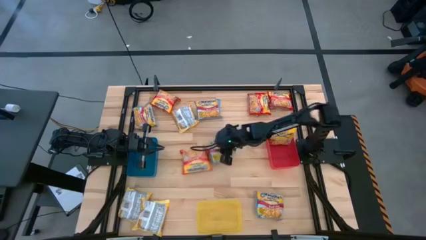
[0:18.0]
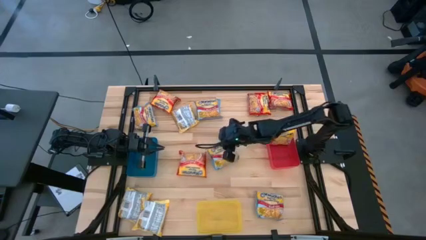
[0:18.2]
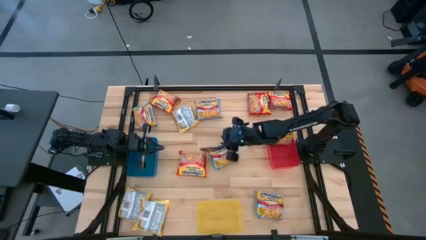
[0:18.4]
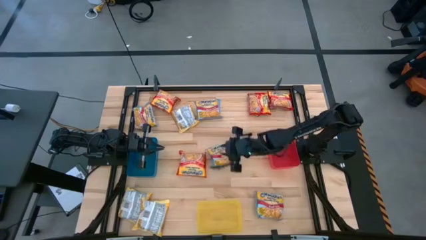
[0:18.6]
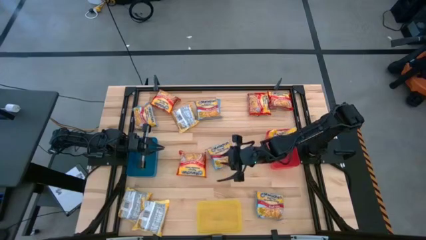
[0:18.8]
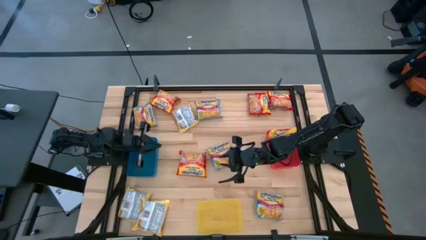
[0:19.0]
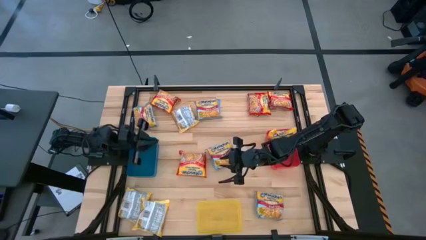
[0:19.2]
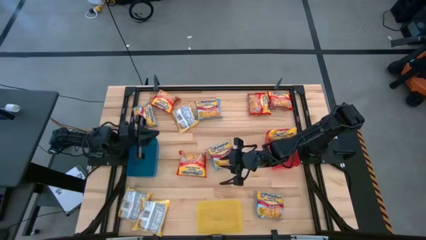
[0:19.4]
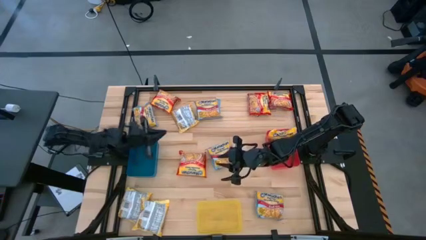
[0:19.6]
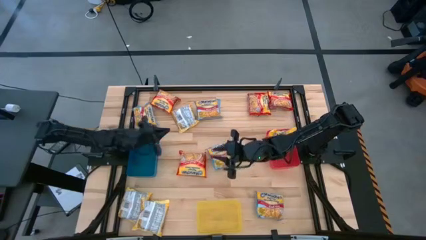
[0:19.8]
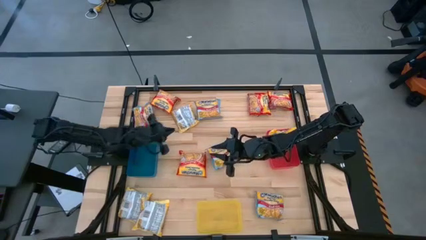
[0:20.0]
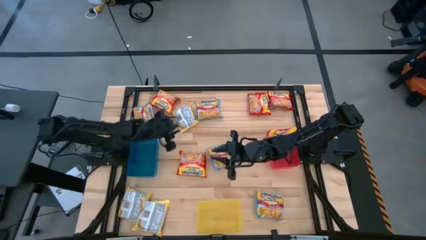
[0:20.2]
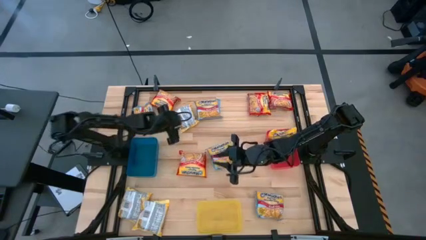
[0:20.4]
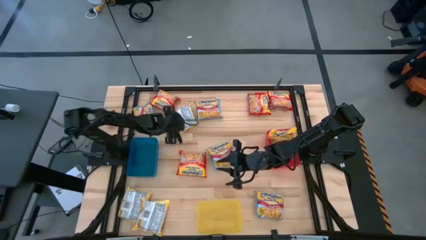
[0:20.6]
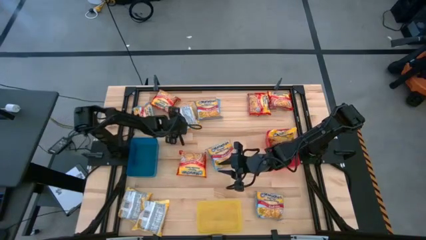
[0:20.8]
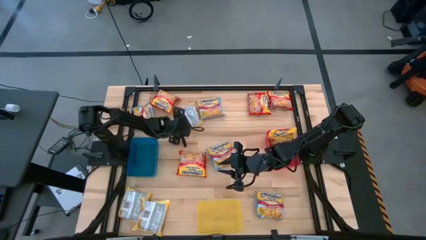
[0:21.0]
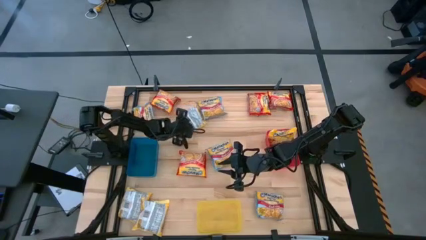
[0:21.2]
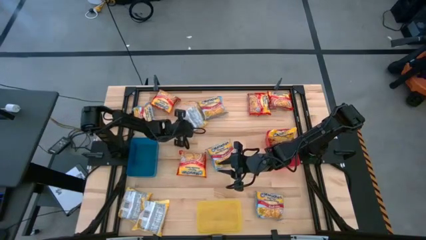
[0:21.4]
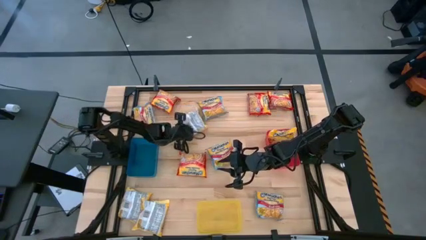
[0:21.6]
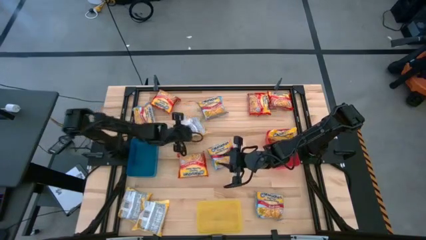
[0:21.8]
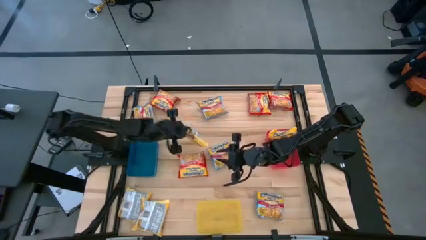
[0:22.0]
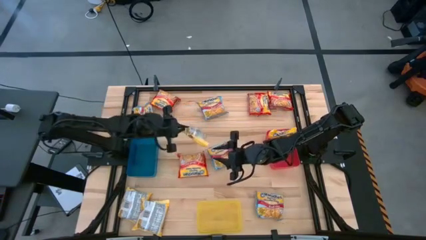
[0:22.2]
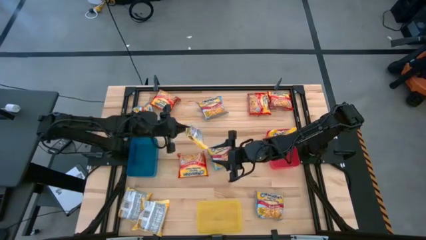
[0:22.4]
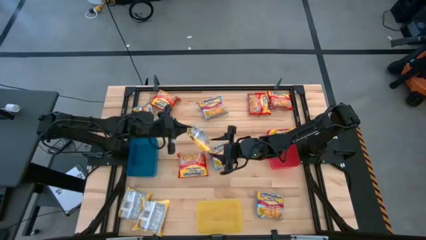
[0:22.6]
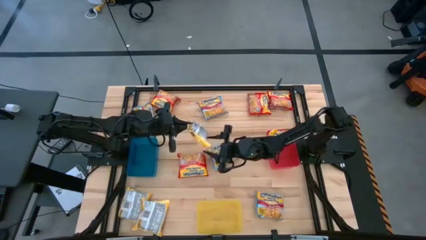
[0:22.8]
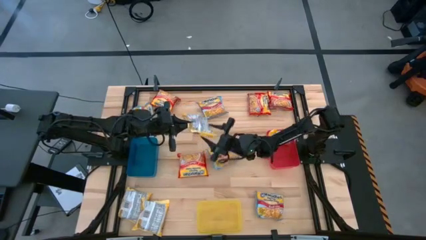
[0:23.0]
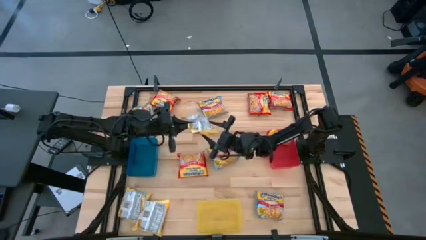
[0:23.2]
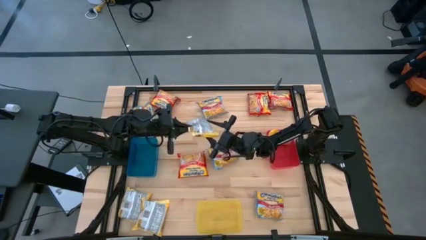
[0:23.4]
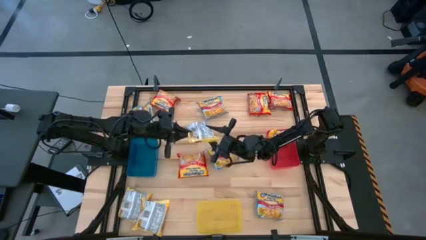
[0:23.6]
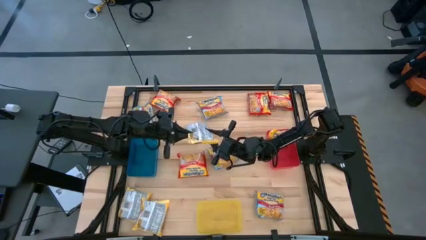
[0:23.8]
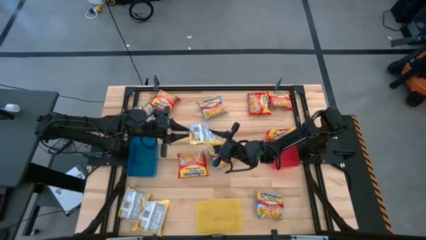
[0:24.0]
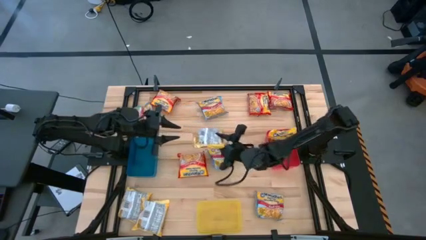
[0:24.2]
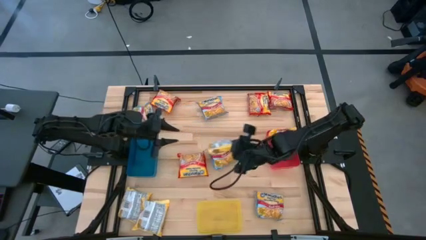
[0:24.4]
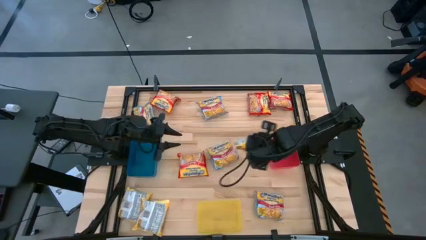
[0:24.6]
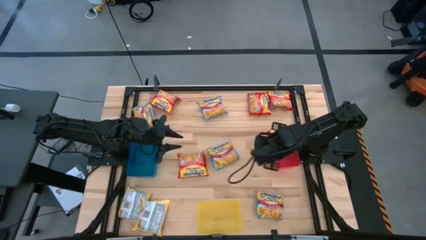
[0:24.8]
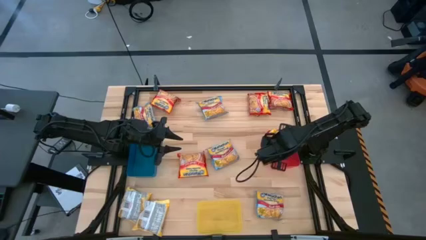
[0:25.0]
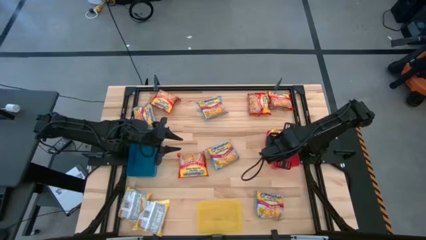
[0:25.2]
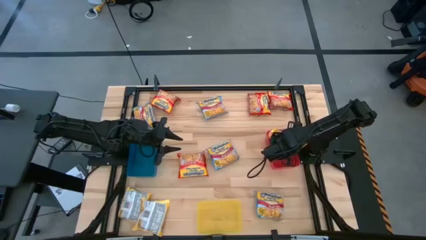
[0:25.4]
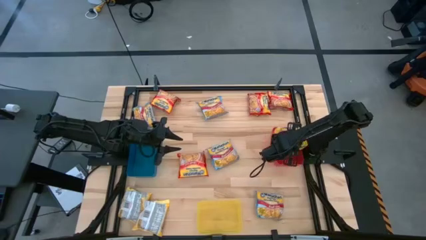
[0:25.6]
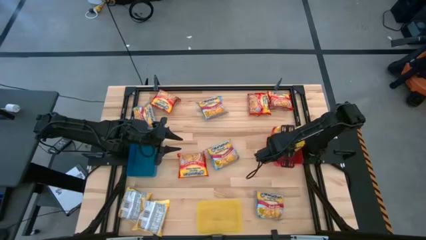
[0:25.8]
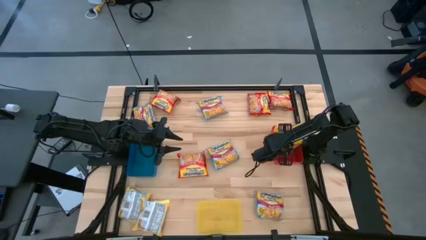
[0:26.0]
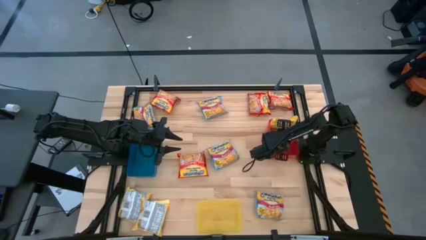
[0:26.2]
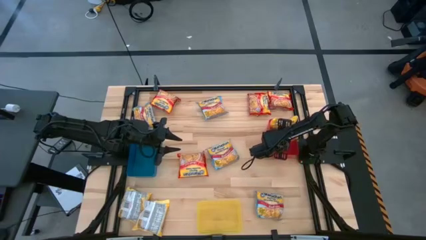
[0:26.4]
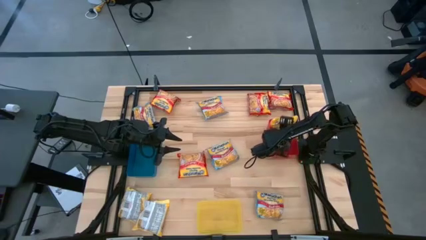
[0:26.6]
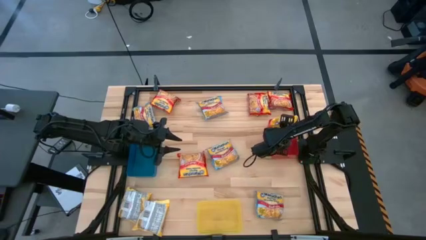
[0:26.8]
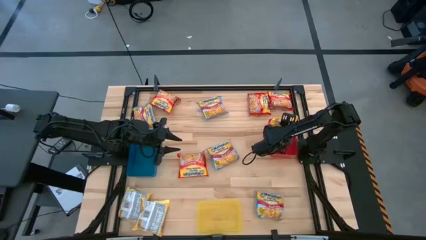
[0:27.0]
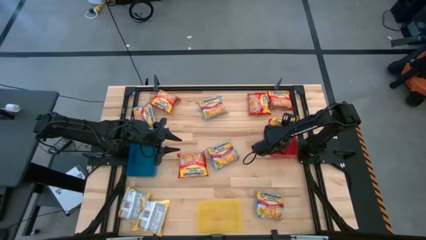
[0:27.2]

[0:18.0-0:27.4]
Task: Sort Maruchan noodles
Put the yellow noodle pack into the red bin
